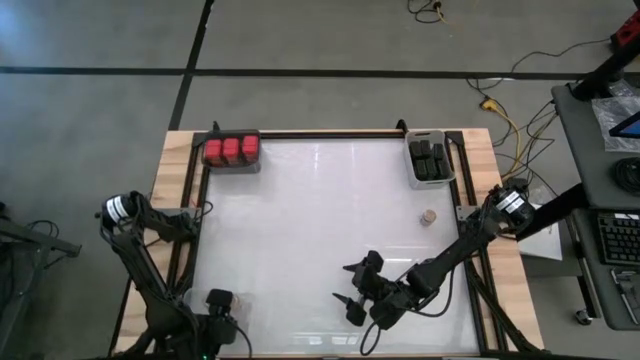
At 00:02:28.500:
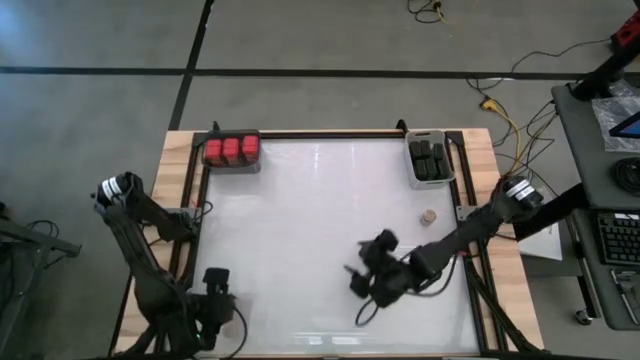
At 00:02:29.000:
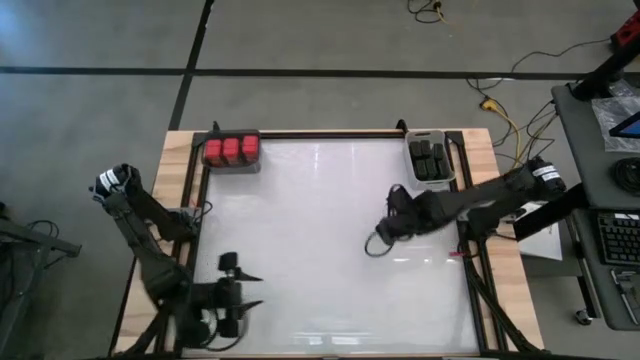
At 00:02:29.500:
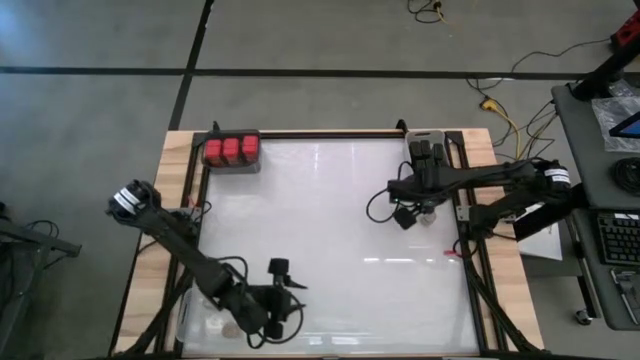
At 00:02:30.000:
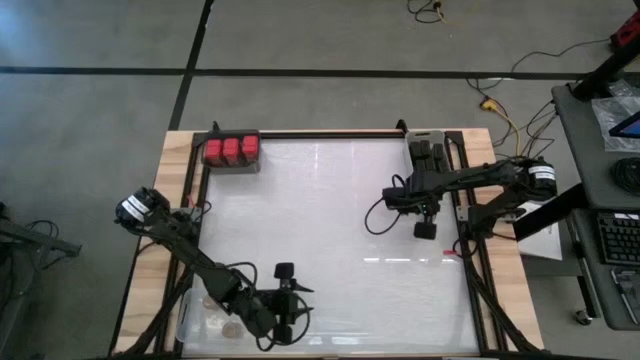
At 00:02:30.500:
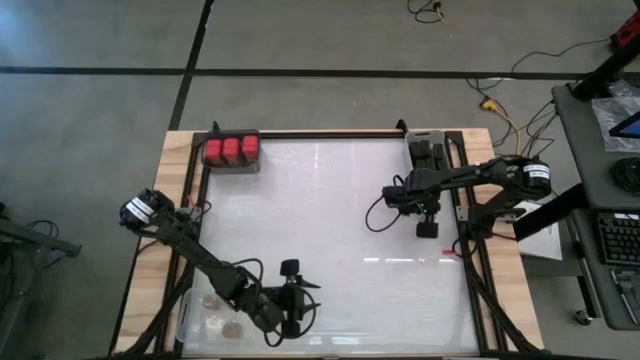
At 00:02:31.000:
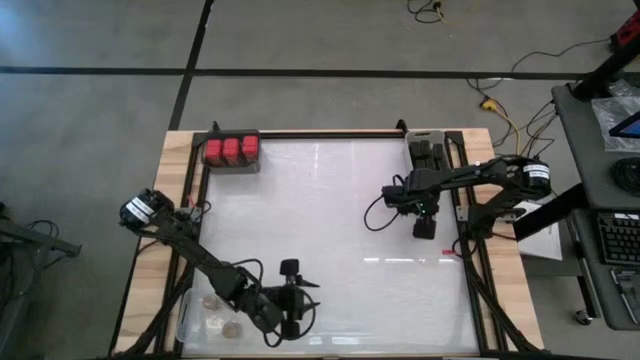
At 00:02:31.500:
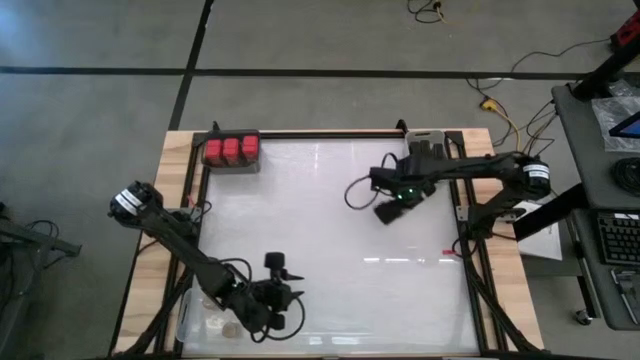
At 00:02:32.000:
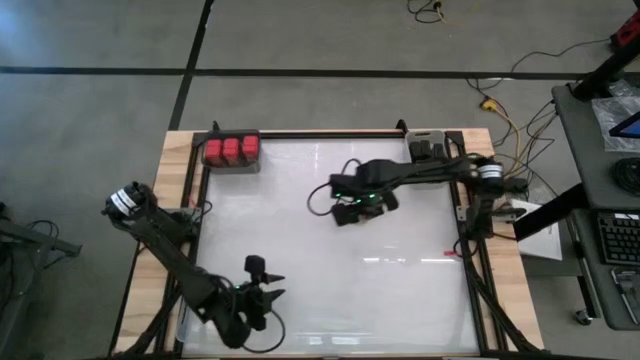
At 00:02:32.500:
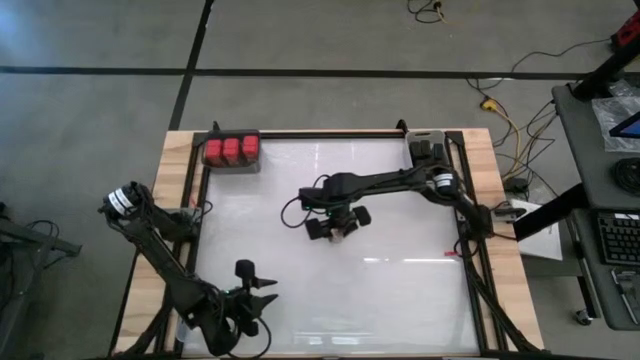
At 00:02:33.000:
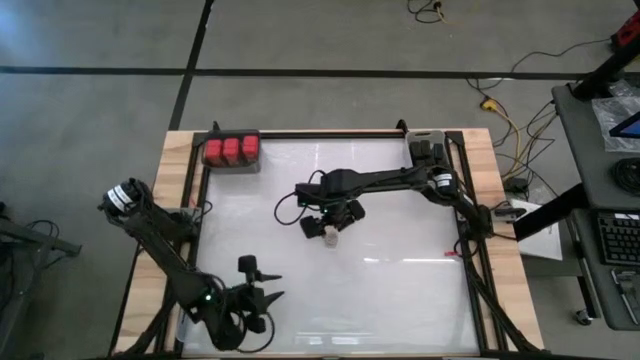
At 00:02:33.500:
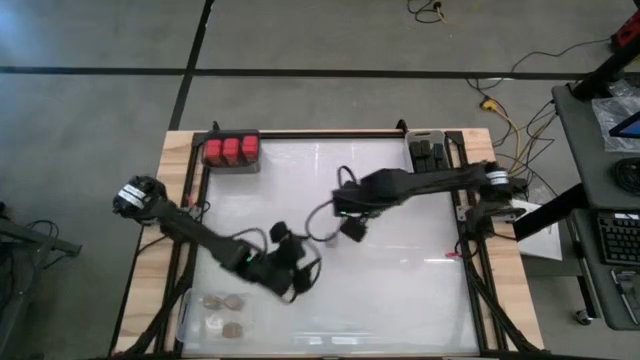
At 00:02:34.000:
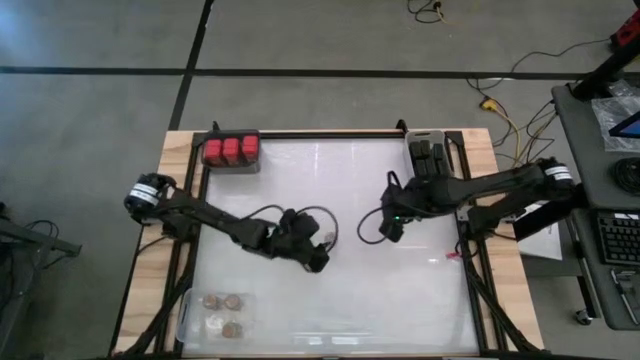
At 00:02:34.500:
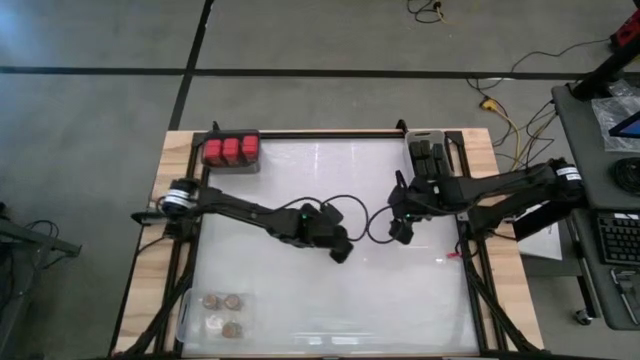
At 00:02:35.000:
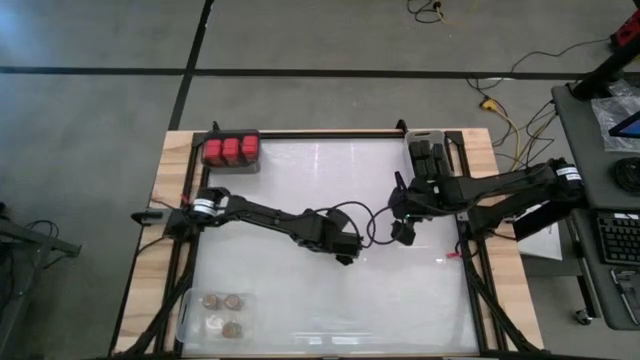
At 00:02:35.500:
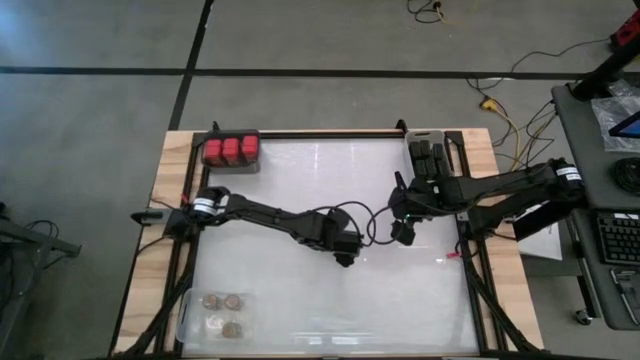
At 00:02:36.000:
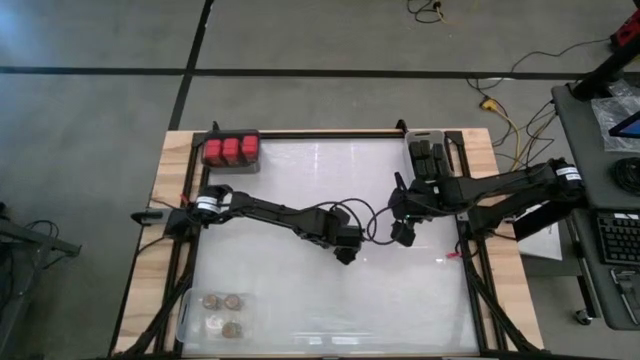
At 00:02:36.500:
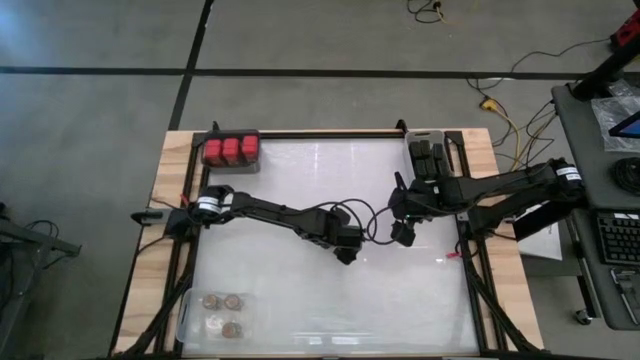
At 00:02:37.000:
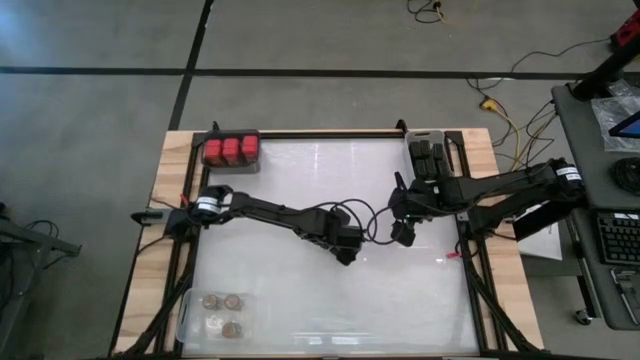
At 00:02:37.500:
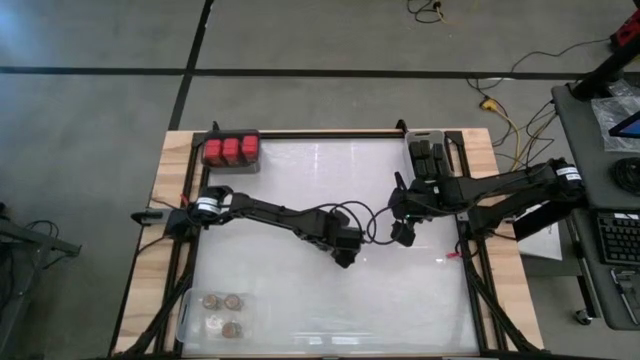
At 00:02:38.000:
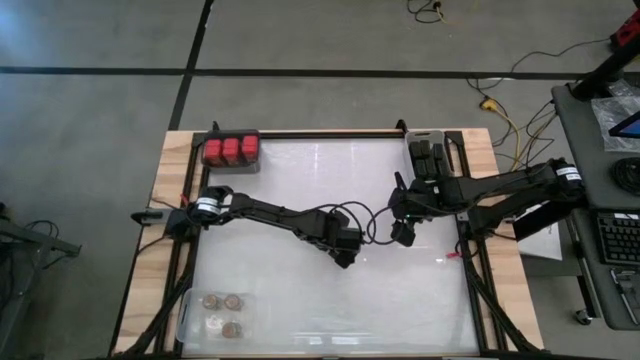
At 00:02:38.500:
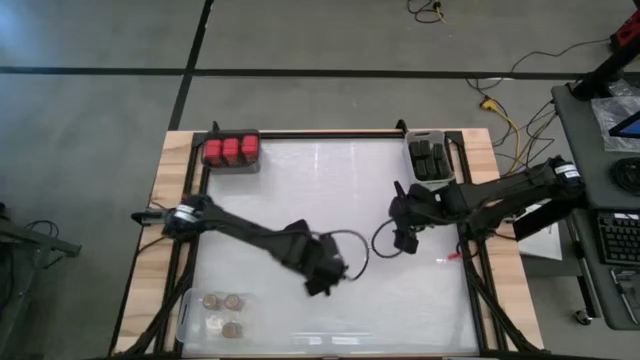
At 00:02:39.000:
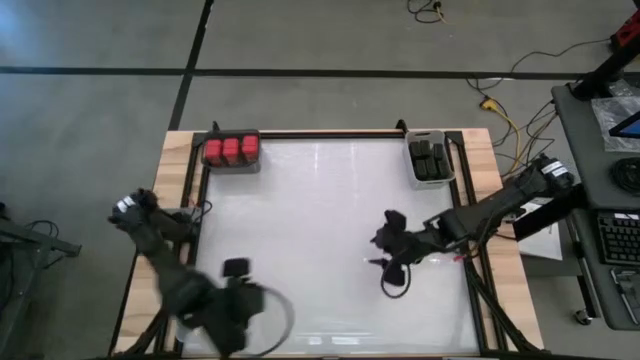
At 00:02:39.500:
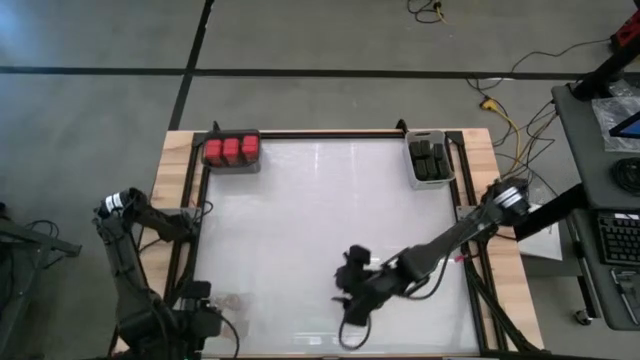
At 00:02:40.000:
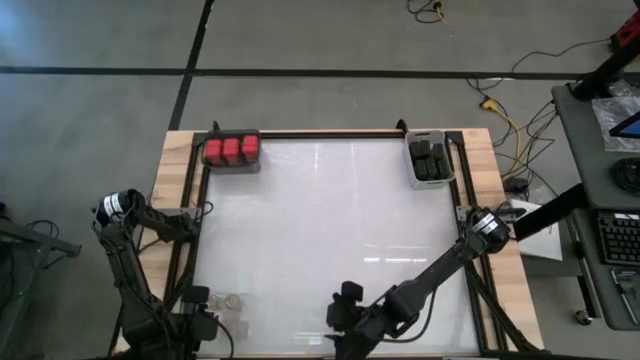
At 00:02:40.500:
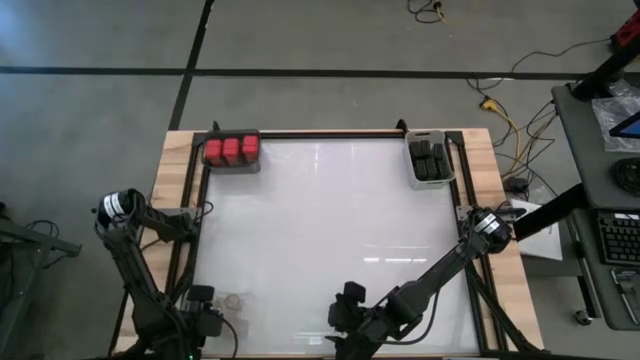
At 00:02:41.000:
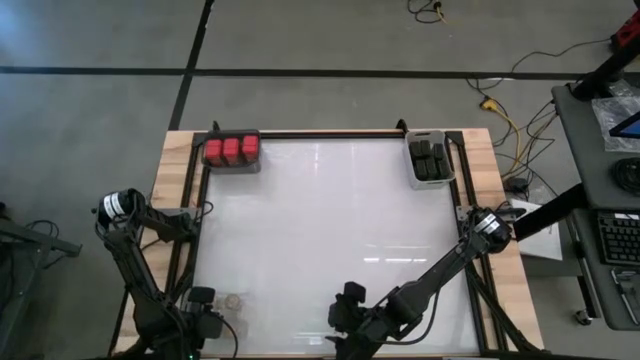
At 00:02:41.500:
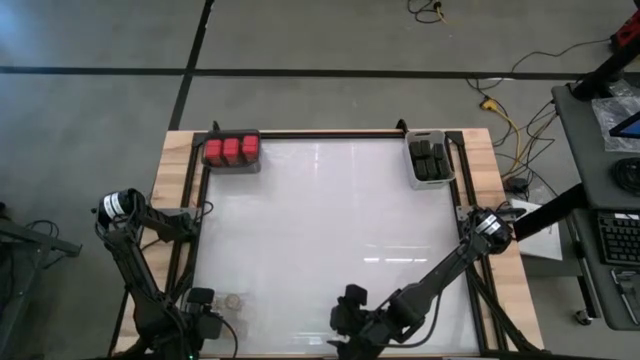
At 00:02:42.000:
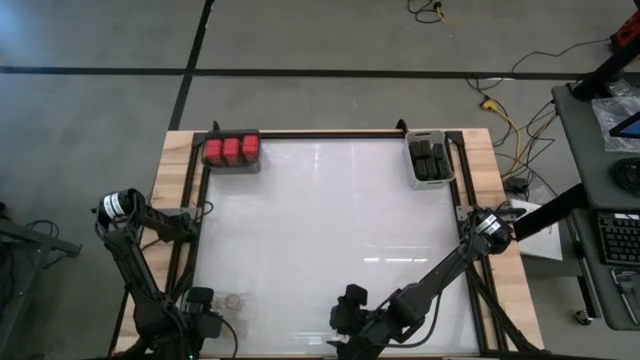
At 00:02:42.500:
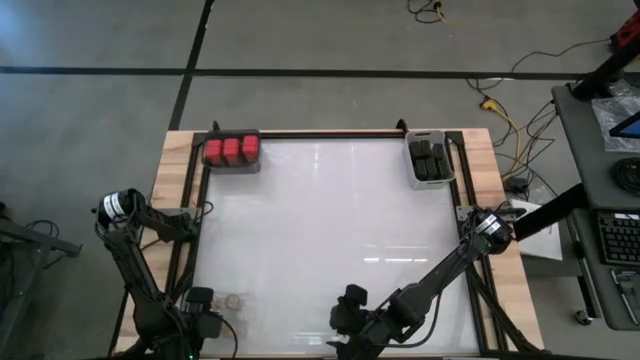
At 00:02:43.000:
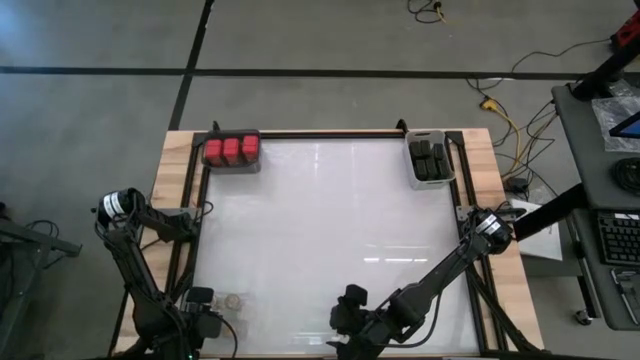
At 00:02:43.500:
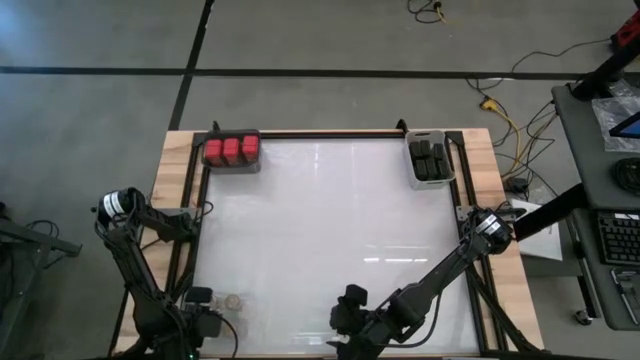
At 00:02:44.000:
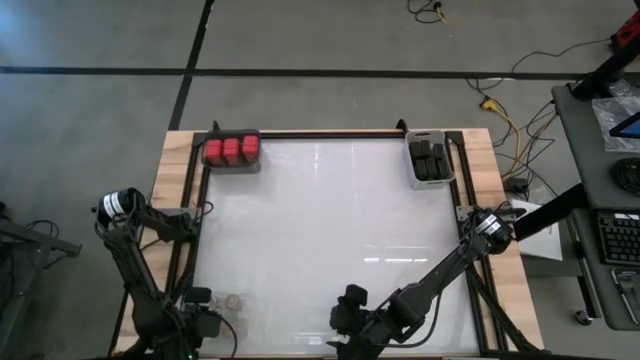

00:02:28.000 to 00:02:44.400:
Task: Sort spices by type
Put the brown seasoning bottle into the transparent bin

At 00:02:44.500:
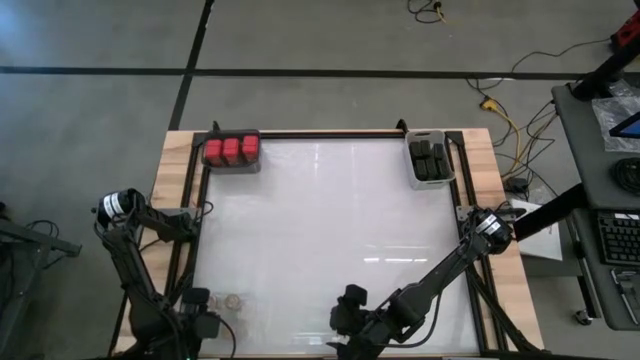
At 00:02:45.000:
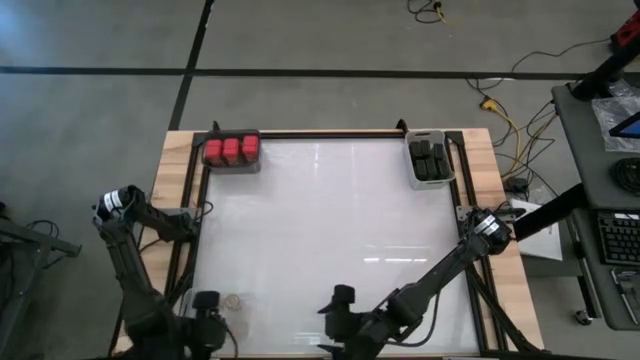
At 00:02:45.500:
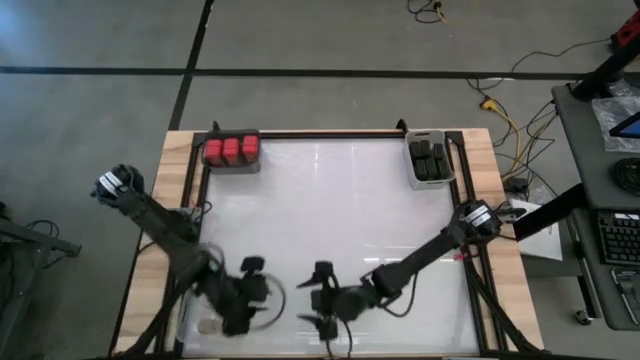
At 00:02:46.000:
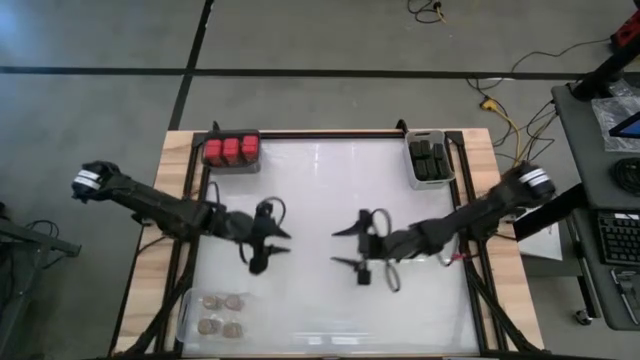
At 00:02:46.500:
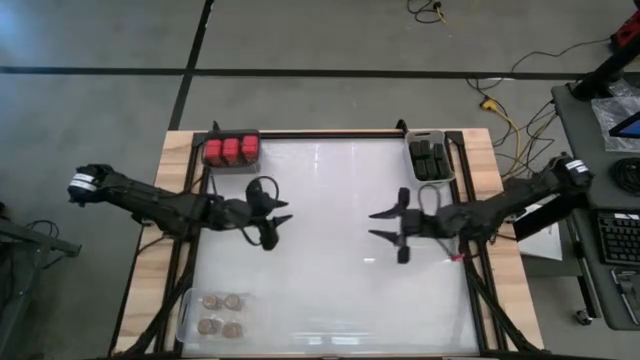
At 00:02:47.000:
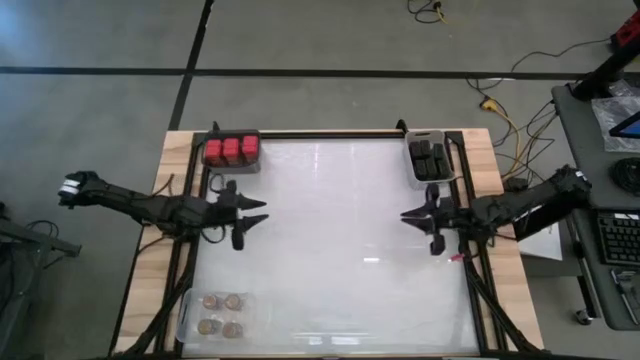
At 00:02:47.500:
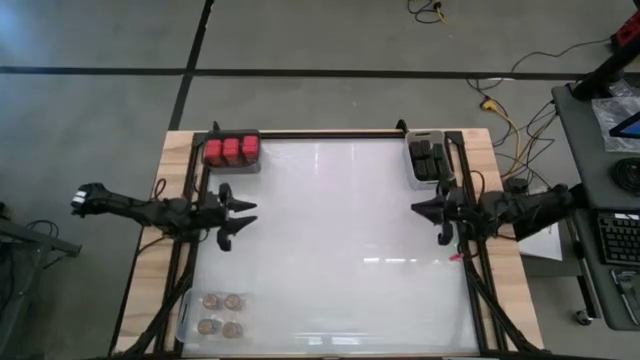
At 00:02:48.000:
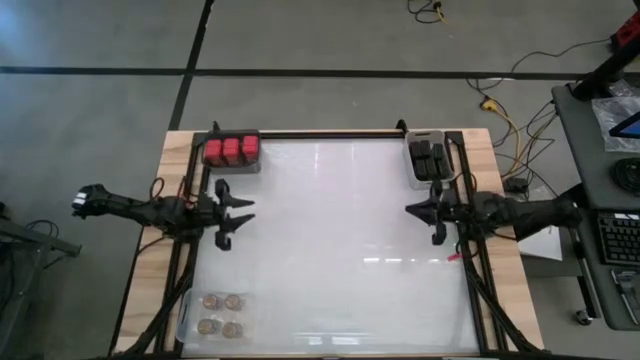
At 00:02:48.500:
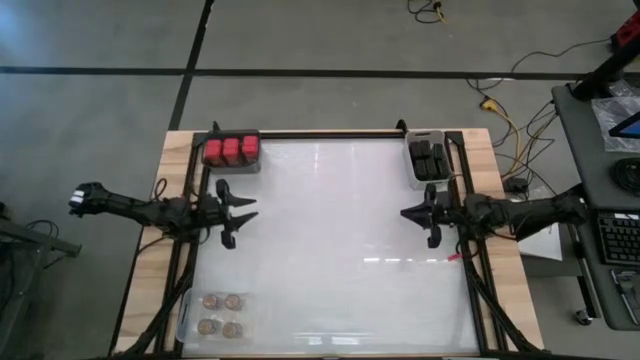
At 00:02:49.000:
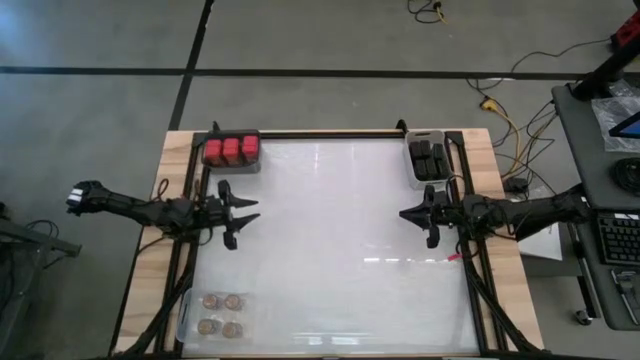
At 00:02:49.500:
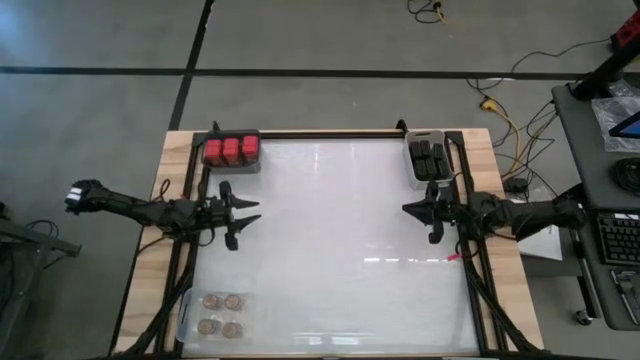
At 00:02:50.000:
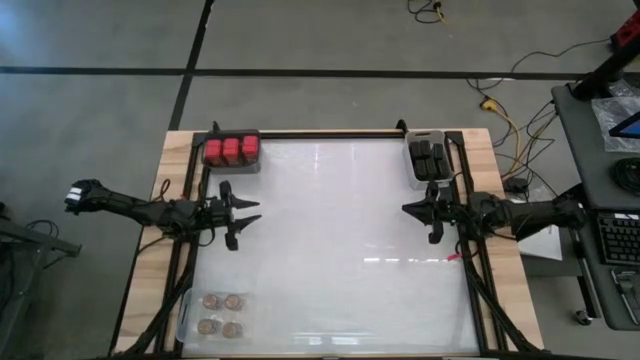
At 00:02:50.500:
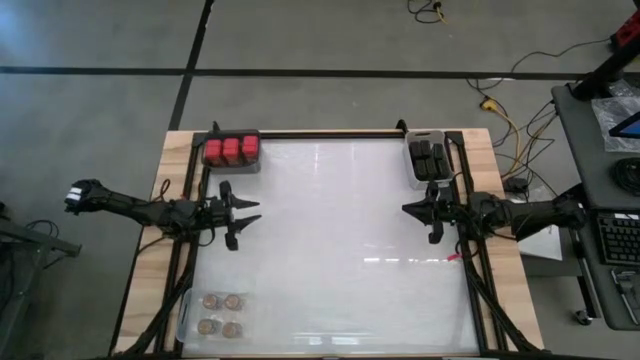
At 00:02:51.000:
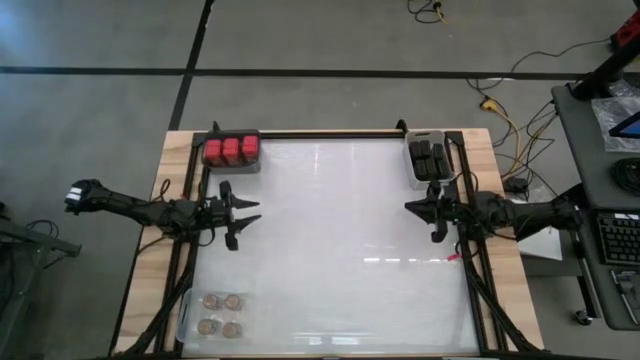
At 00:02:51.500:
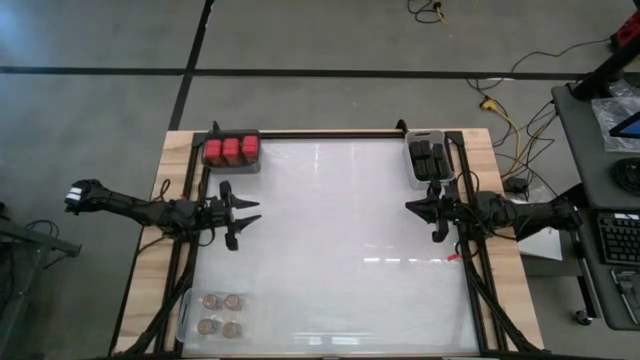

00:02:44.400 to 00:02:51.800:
Return to Home Position
